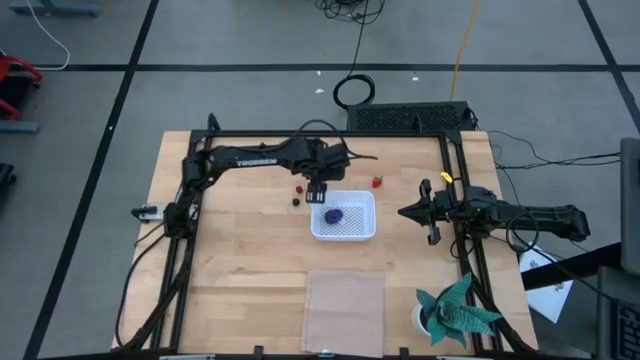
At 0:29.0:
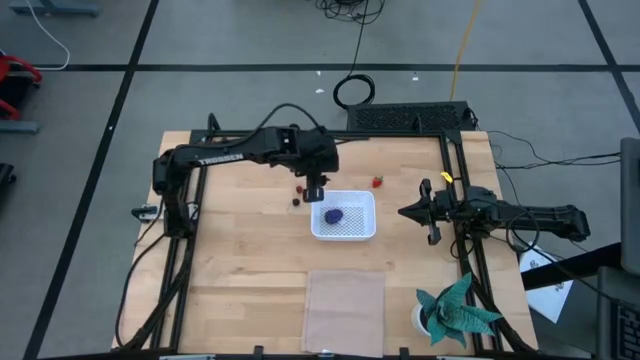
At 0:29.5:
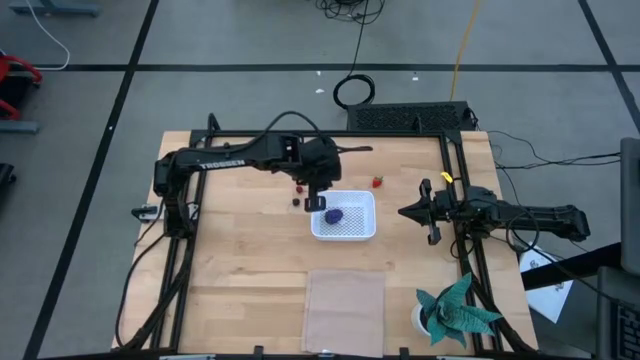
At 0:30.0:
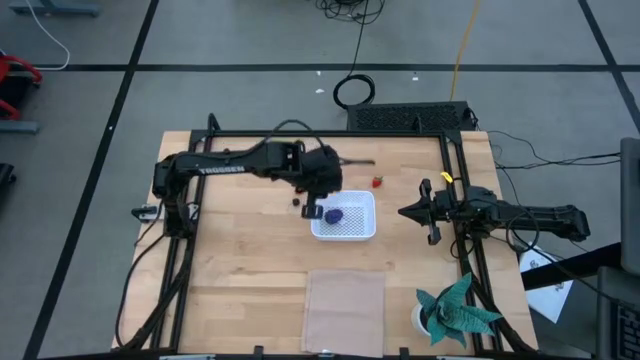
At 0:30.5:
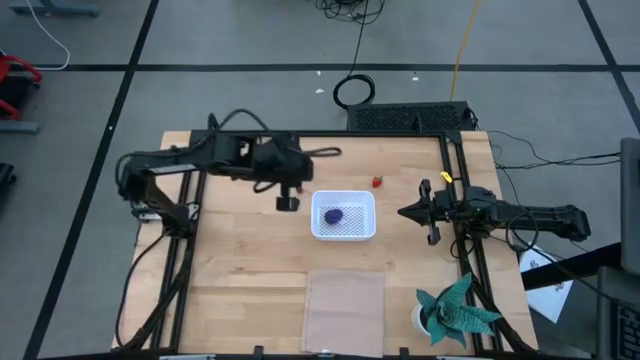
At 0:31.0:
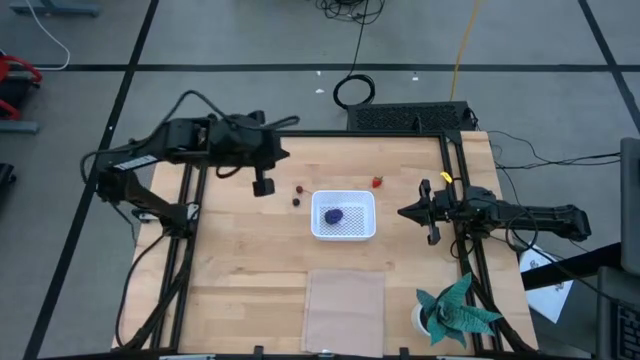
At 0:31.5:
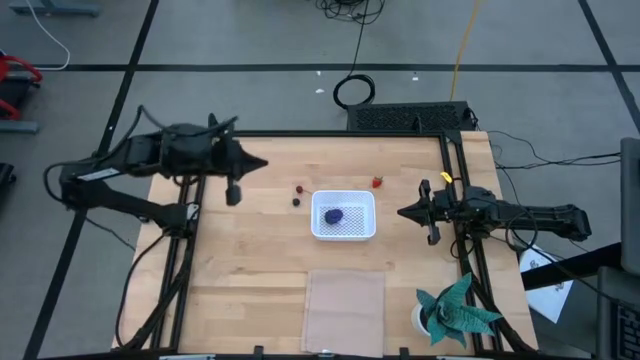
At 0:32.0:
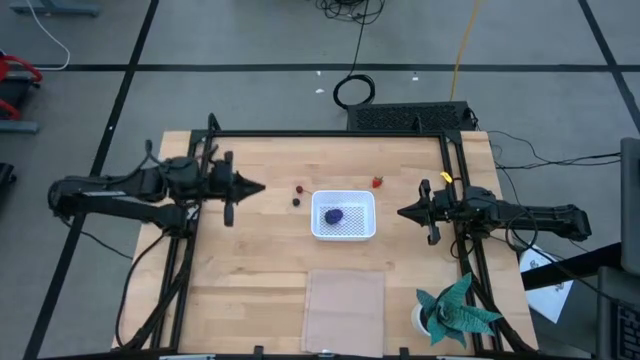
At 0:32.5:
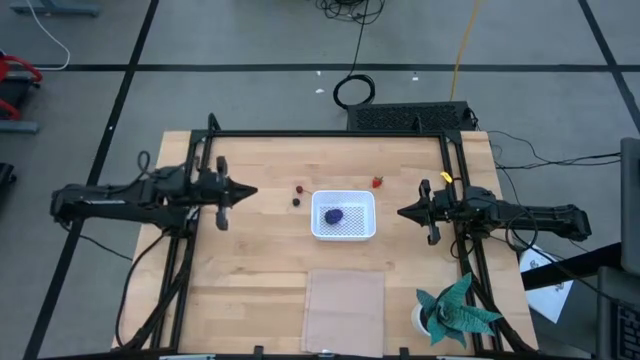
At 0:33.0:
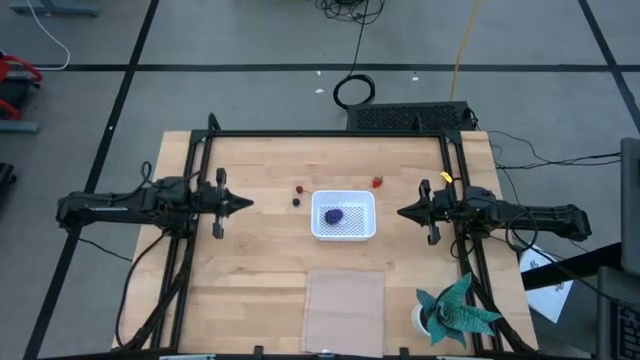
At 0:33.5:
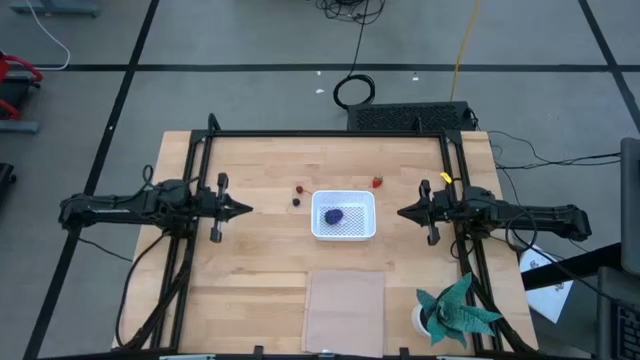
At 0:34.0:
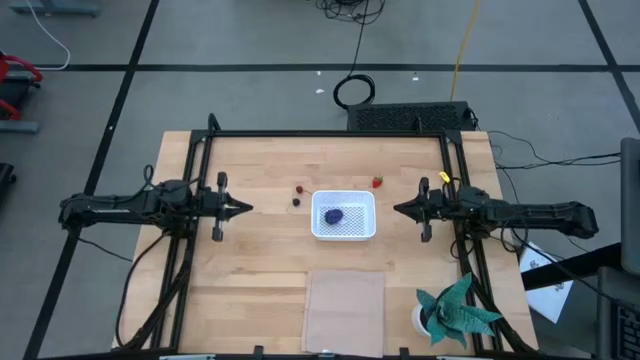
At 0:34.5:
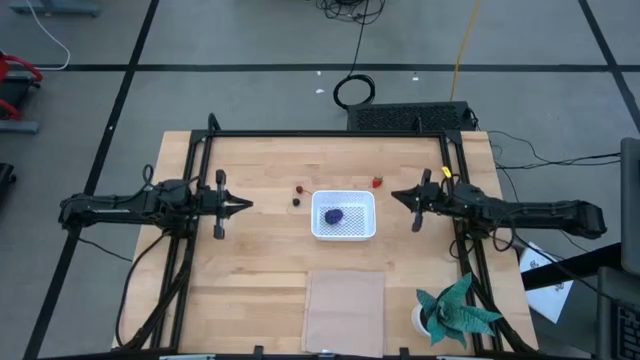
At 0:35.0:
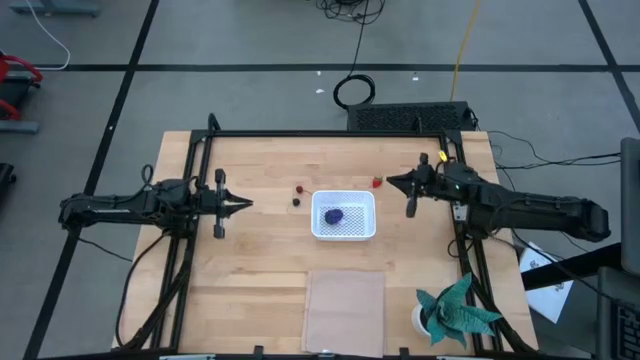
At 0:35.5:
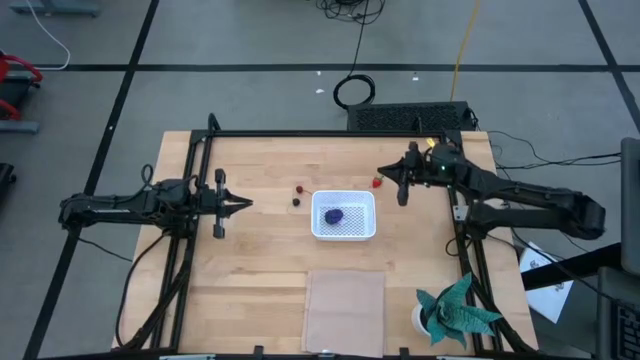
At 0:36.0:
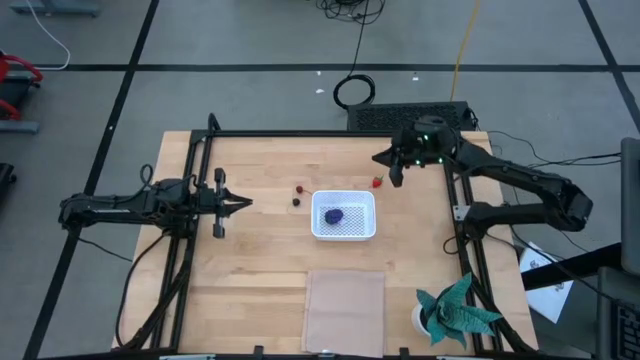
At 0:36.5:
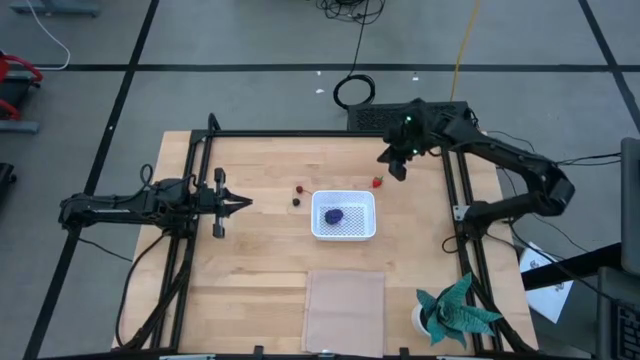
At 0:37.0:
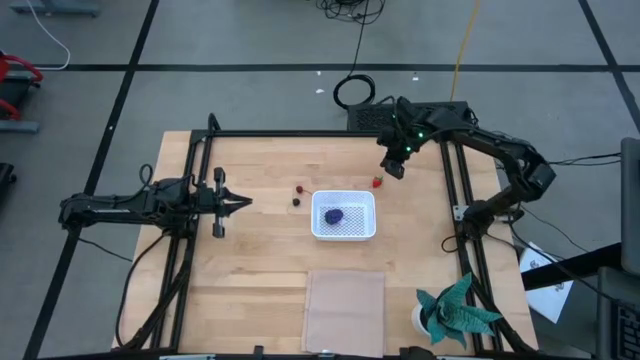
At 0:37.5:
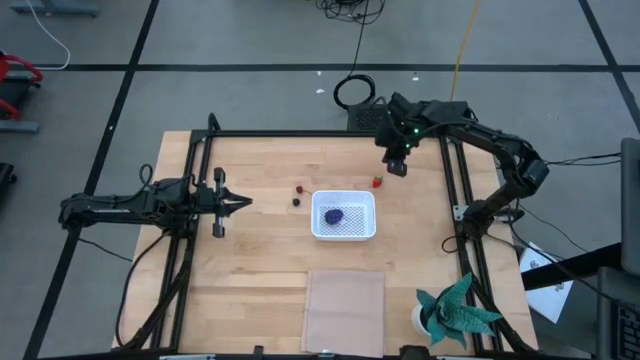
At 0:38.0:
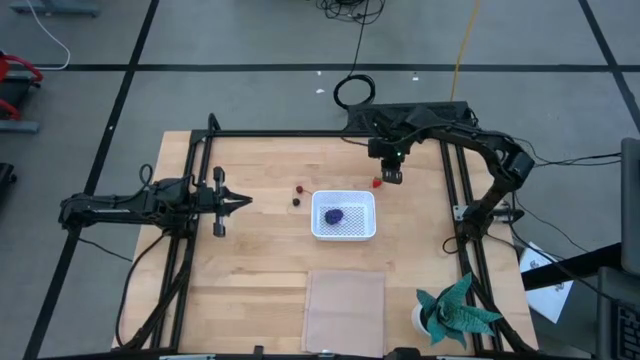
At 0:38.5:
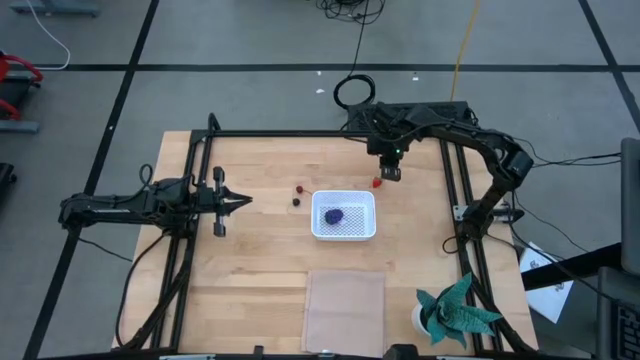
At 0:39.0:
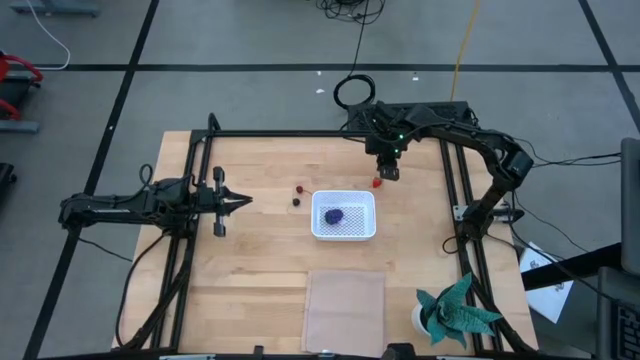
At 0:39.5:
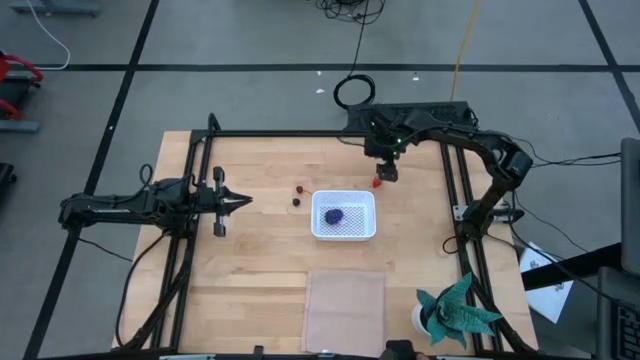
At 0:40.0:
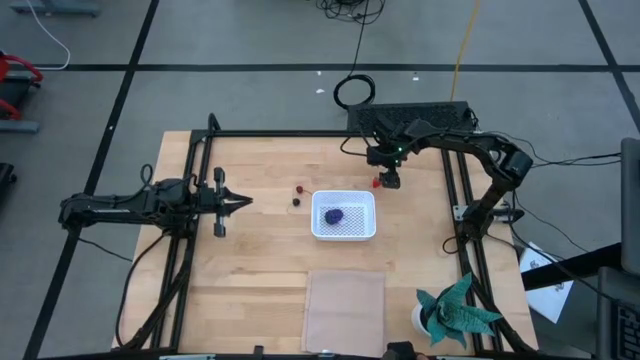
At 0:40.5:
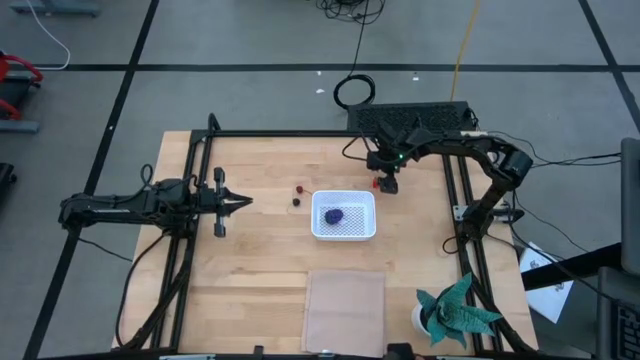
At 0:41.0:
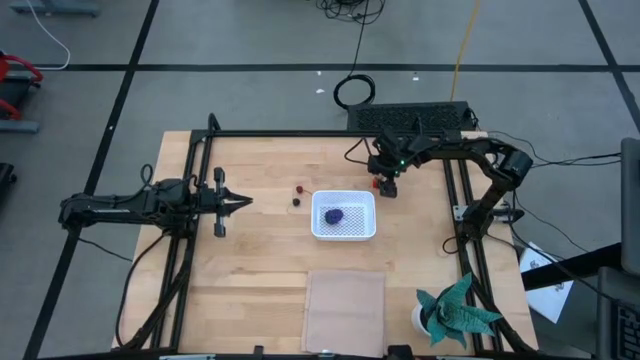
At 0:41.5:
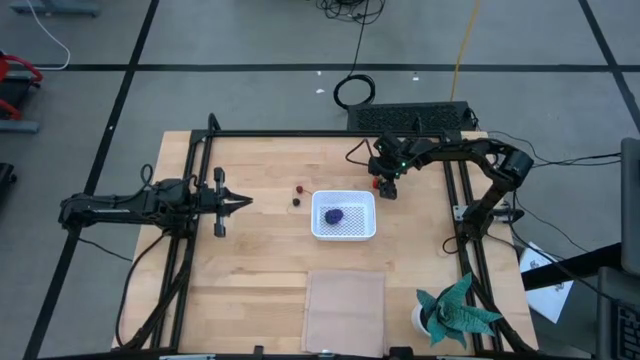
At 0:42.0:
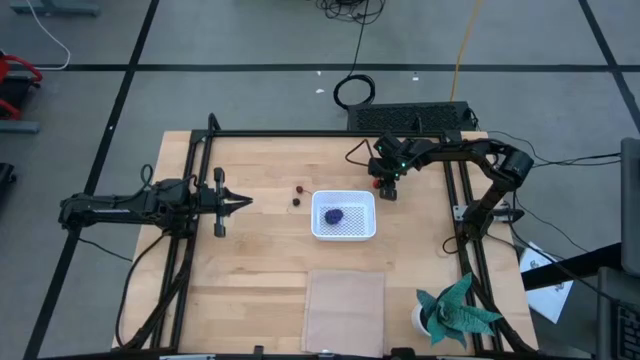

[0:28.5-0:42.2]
Task: Pick and placing Produce into tupperware
Put the red strawberry into the white basket

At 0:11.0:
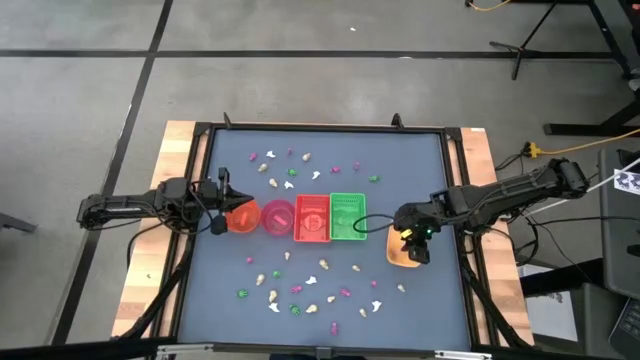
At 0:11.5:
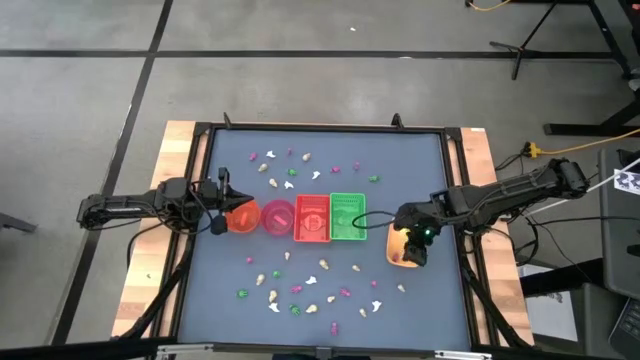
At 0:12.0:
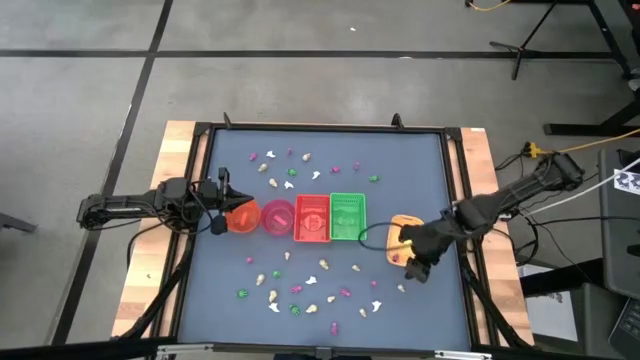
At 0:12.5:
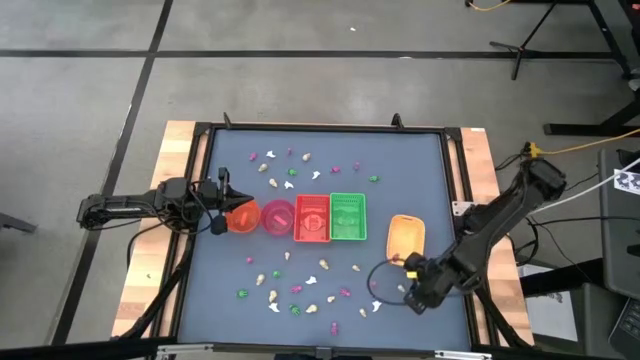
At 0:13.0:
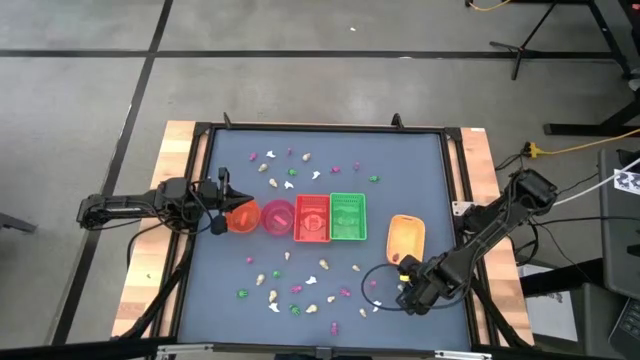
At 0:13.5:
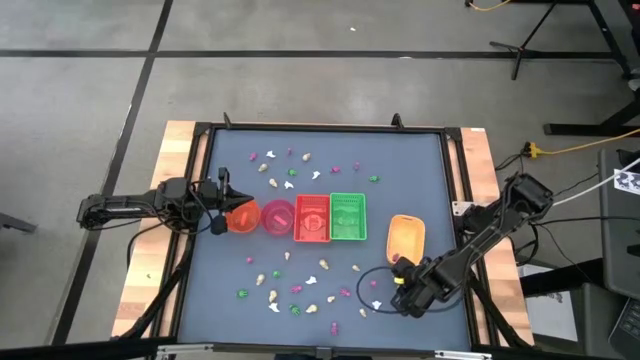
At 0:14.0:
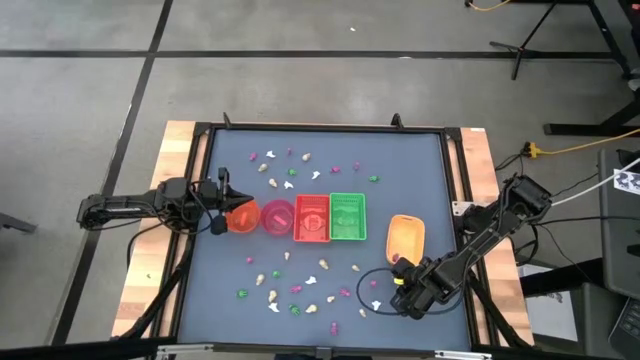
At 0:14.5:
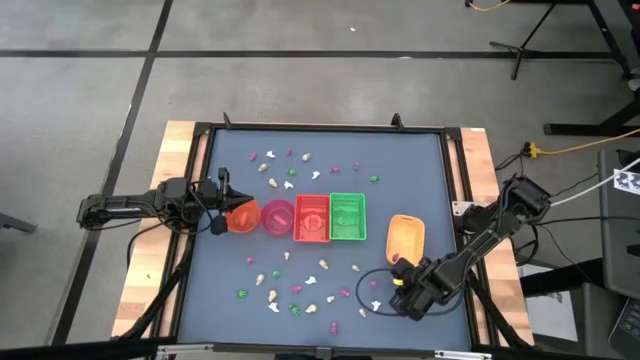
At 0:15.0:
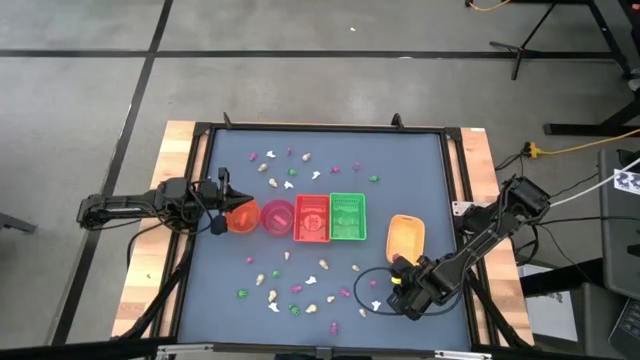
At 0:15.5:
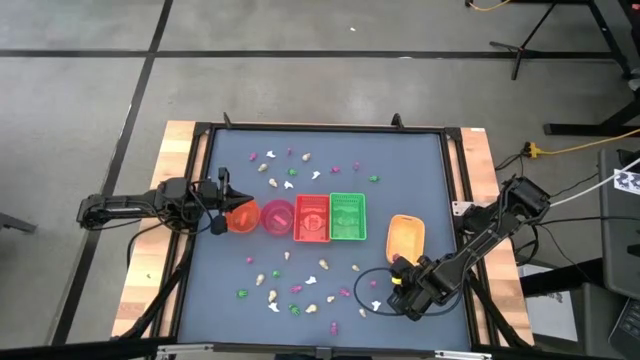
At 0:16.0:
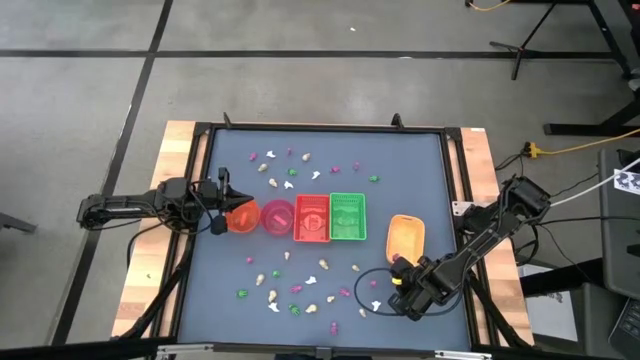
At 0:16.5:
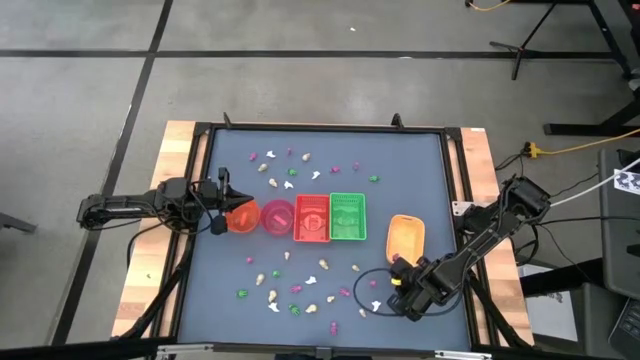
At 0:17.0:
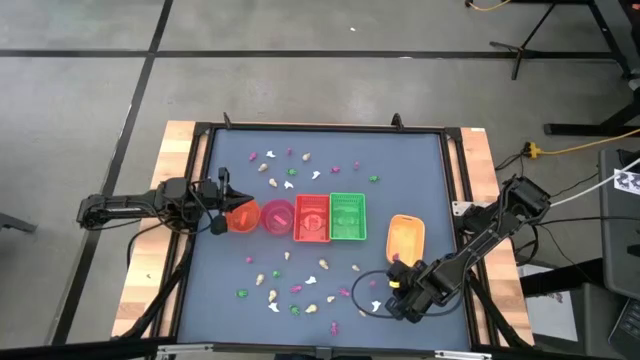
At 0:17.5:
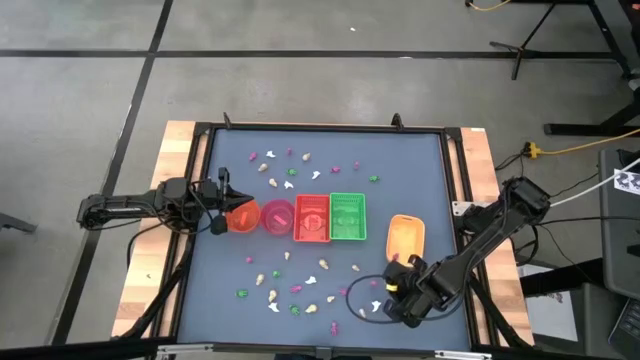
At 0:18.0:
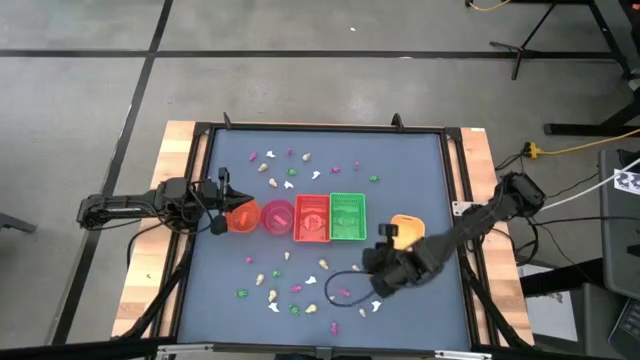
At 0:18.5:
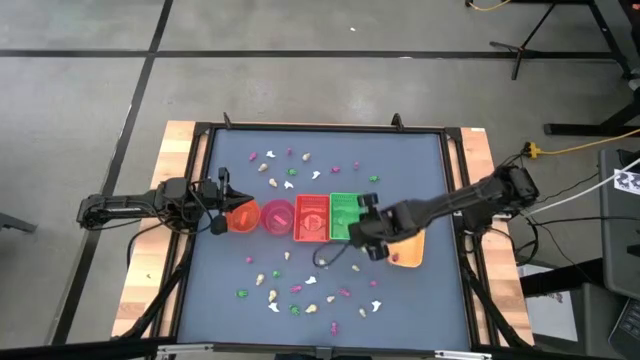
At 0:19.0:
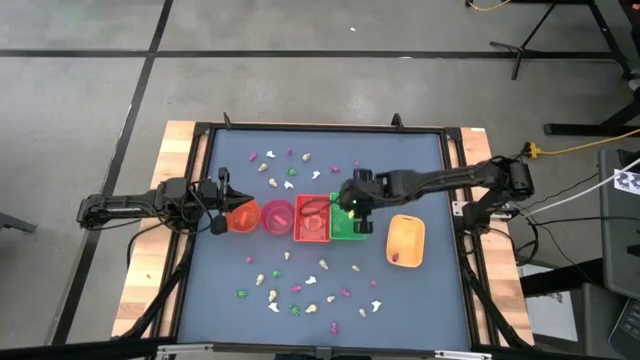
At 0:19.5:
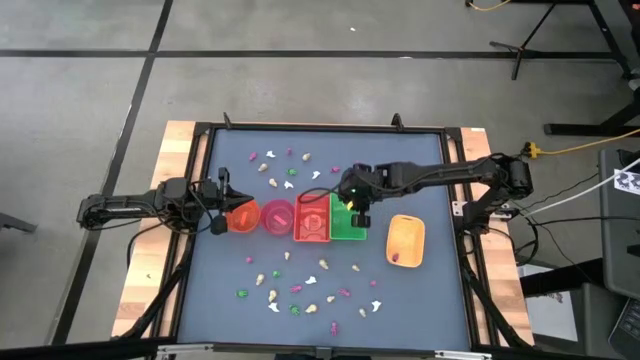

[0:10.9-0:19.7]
Task: Sort Halloween decoration
Put the yellow skull toy in a green bin
